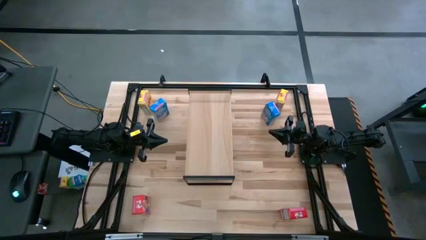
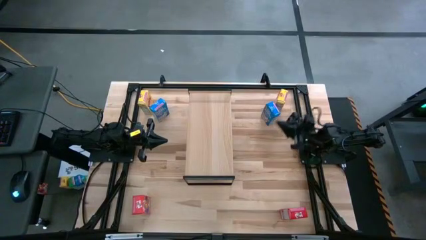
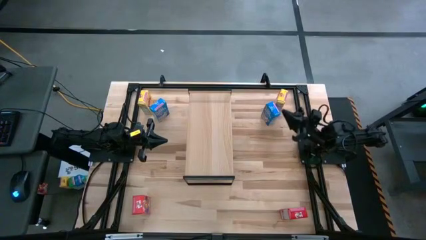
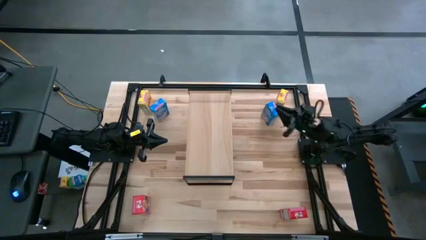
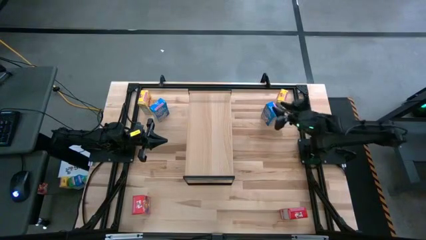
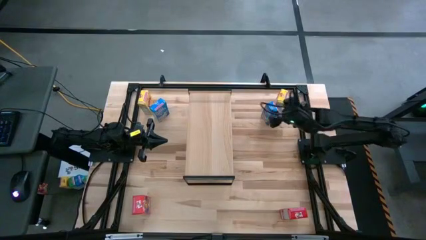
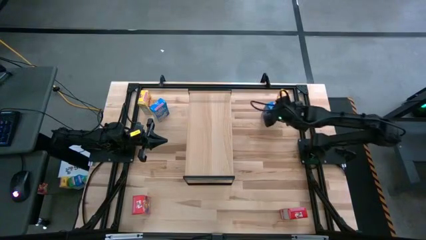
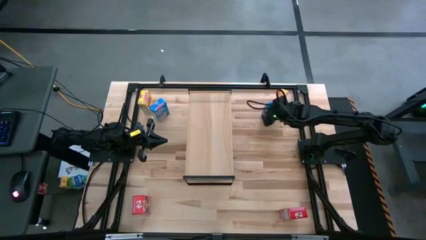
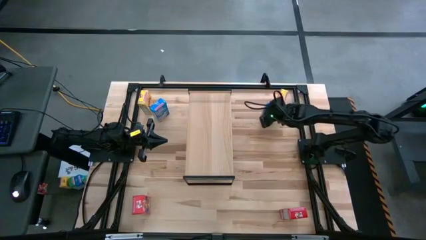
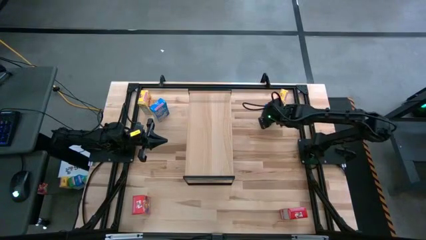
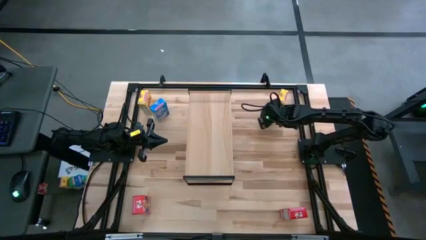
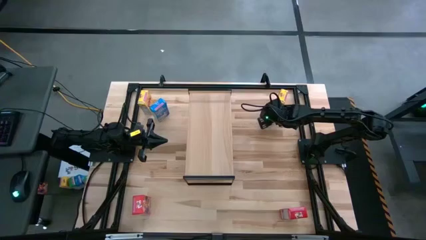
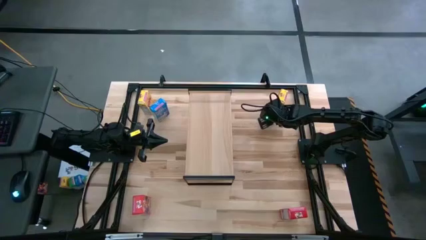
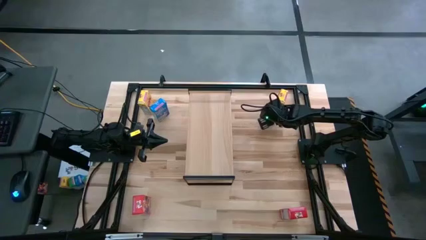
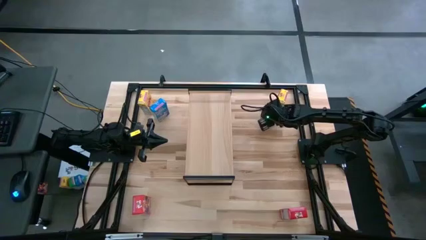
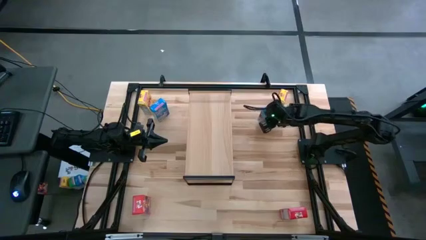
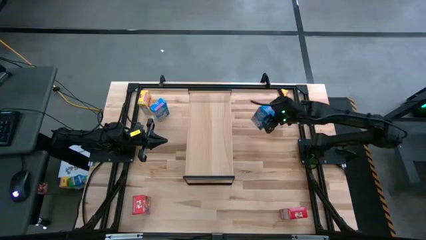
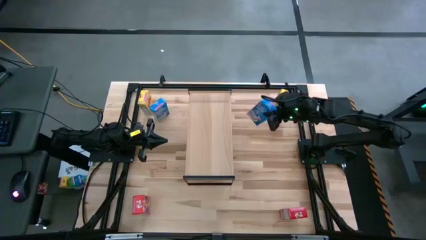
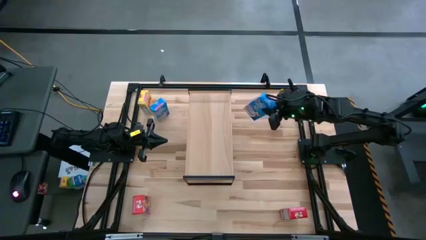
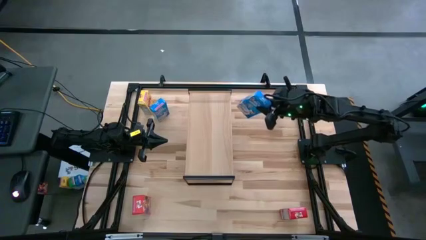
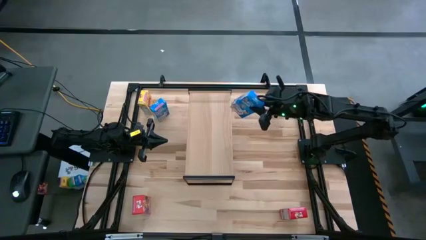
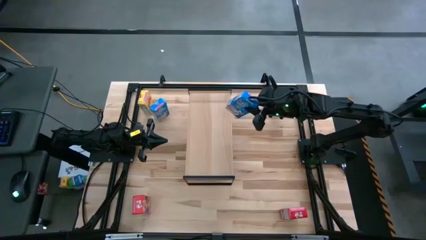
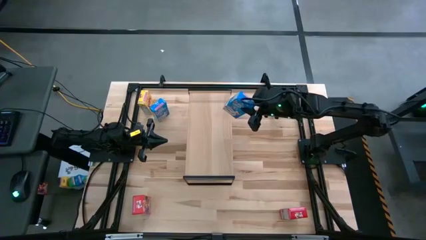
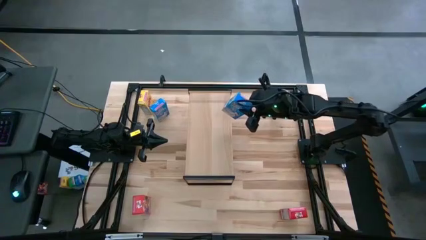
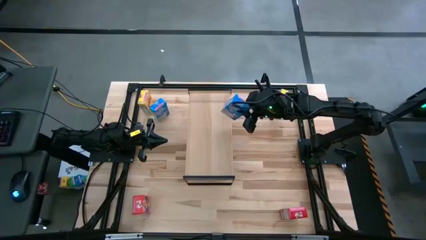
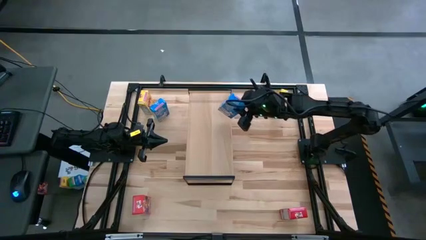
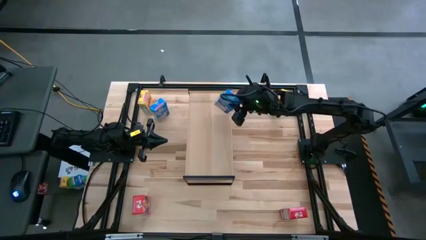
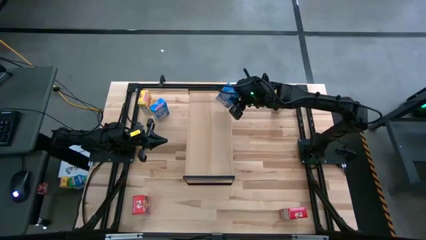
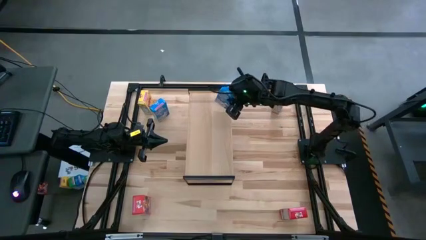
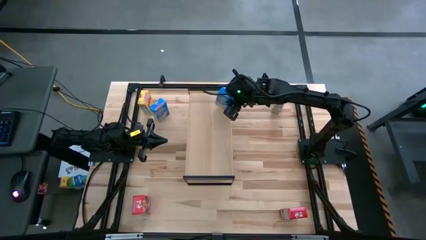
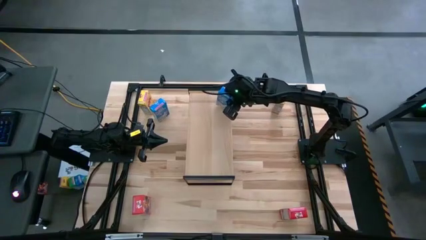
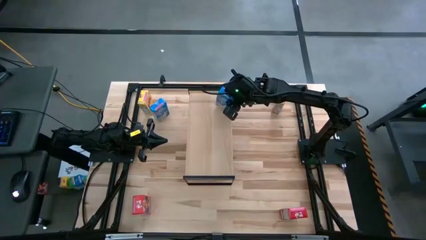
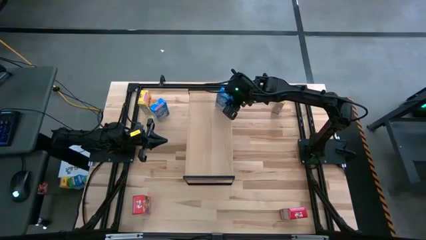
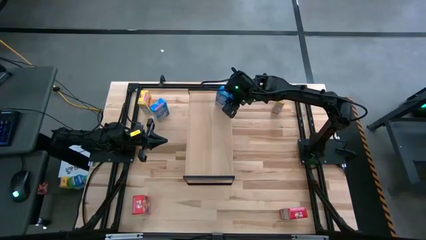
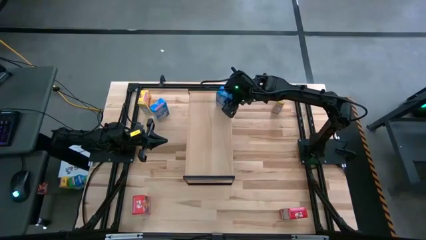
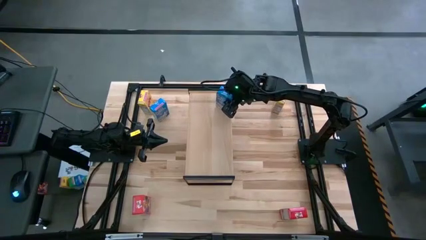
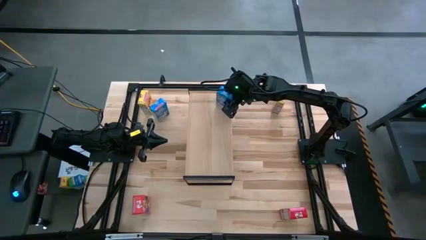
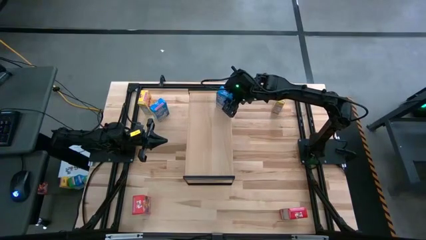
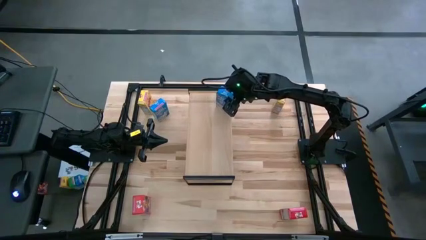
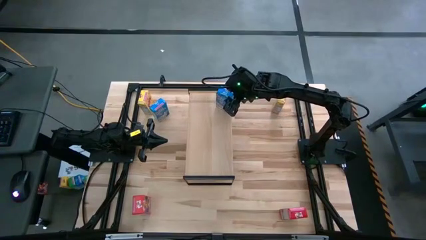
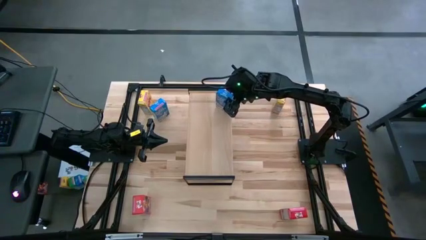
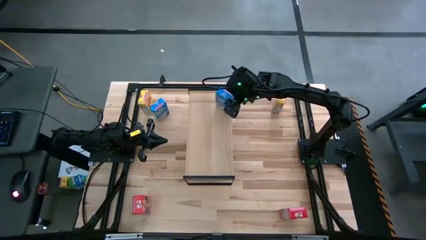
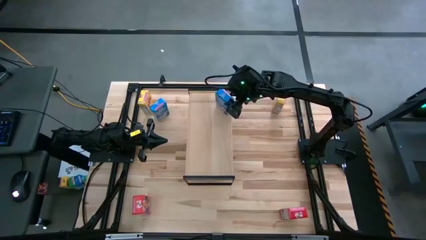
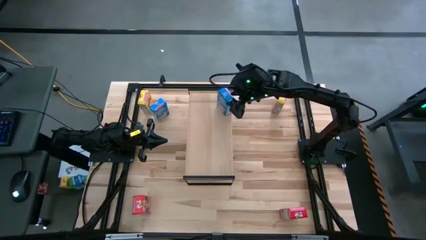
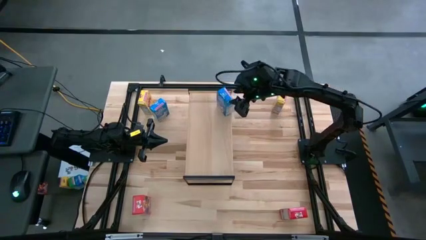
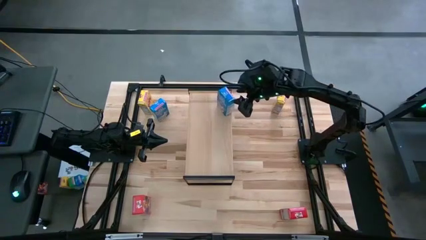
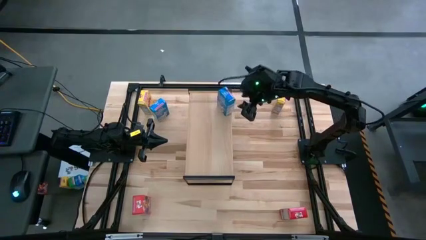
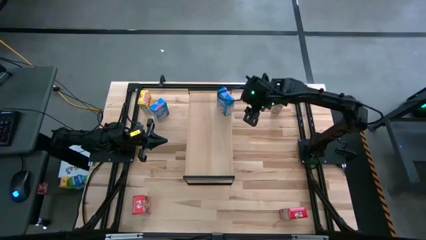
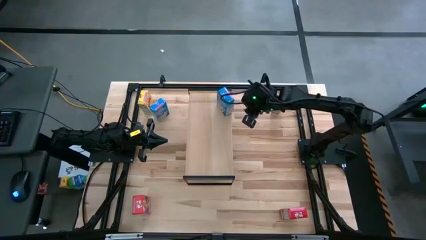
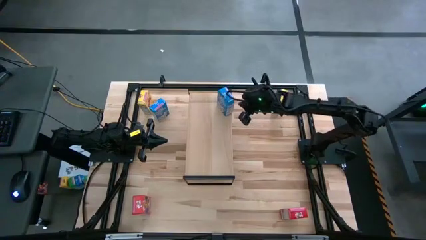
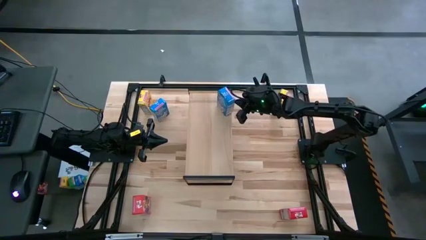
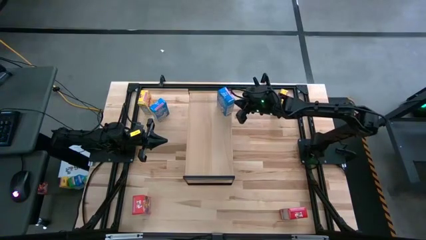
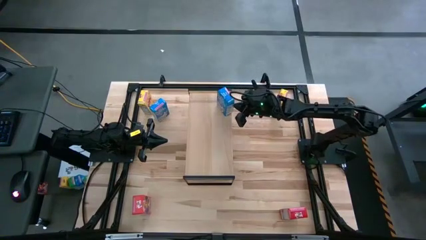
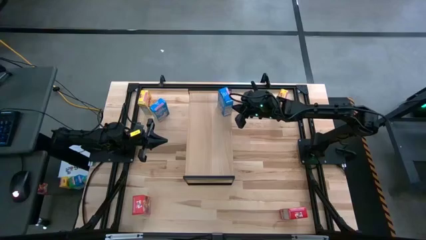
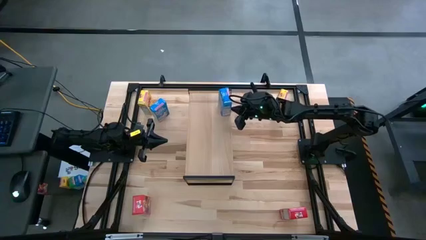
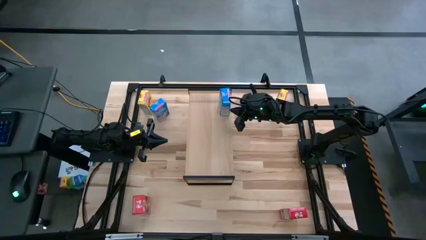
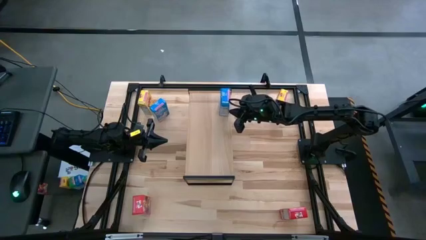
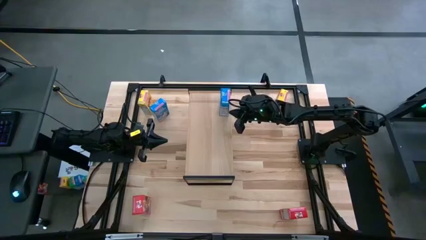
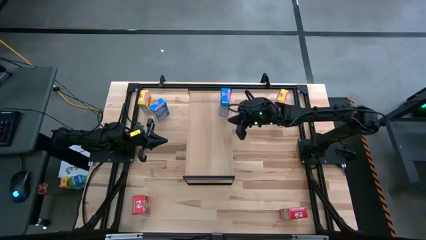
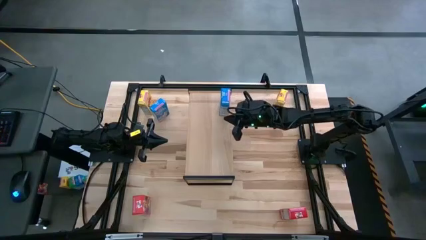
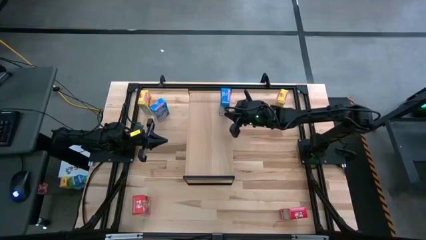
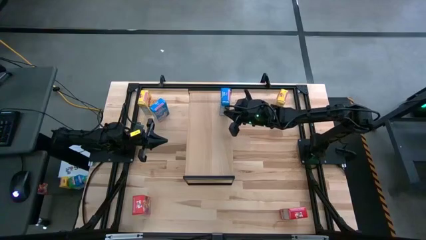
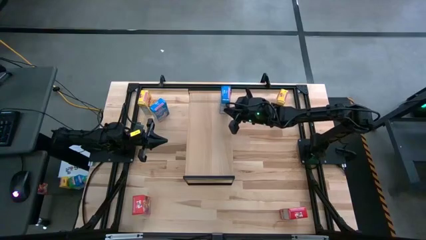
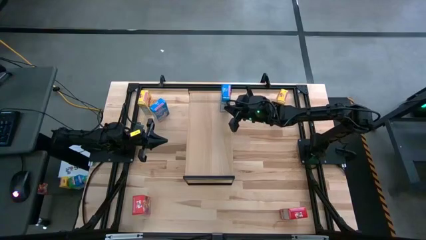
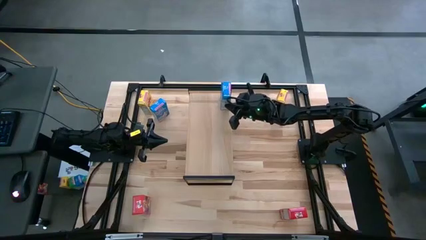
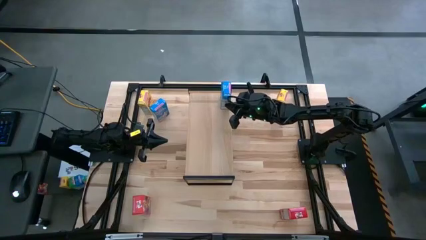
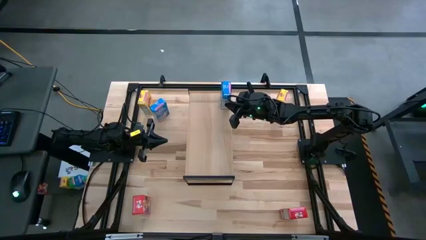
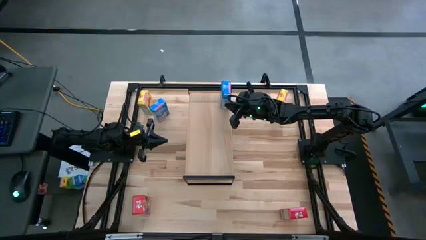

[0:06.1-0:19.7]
Task: Stack cereal on shelf
Put the right blue cereal box on the shelf

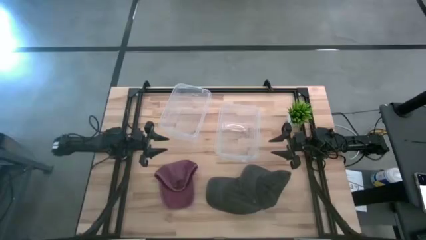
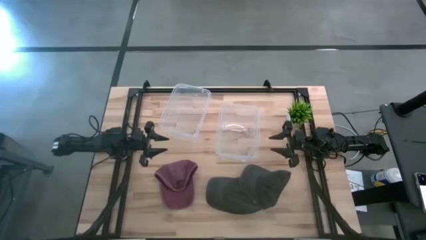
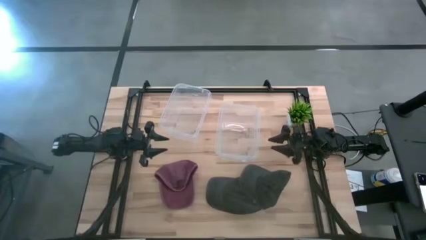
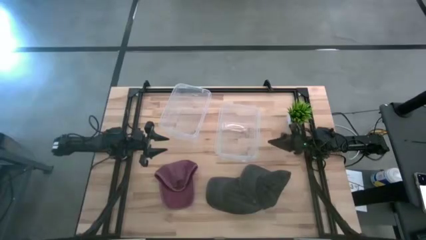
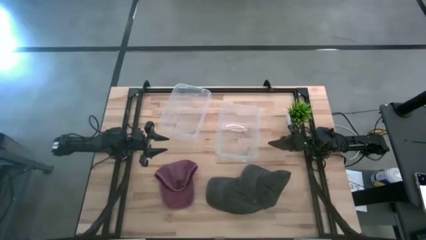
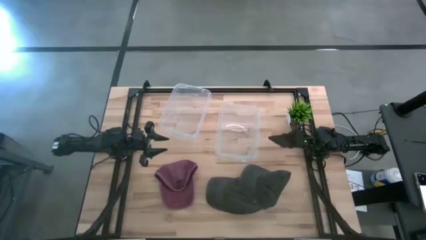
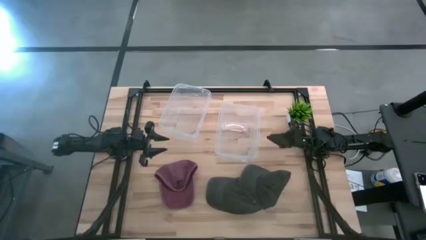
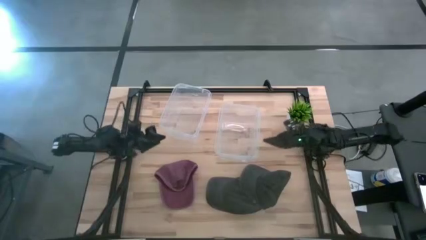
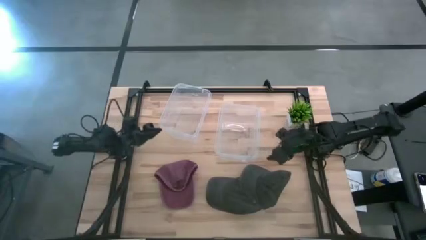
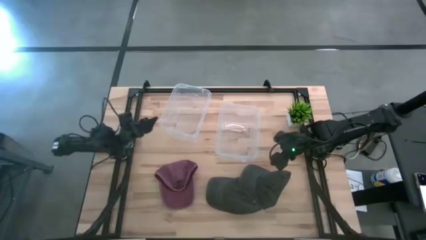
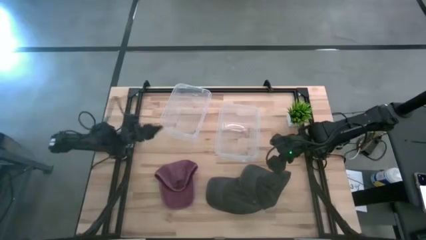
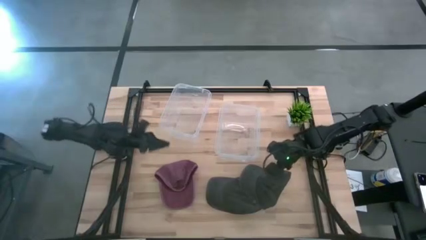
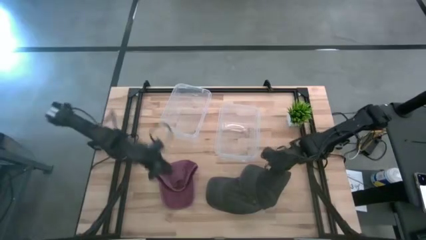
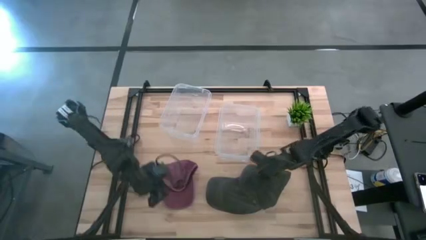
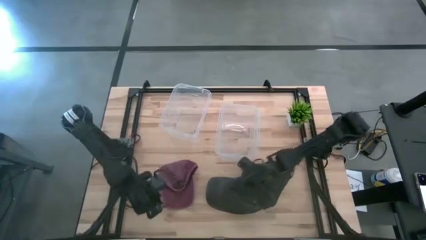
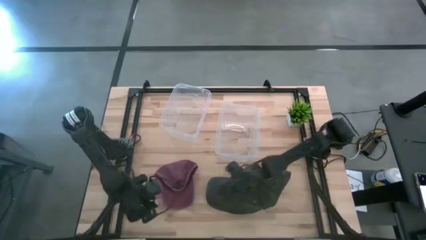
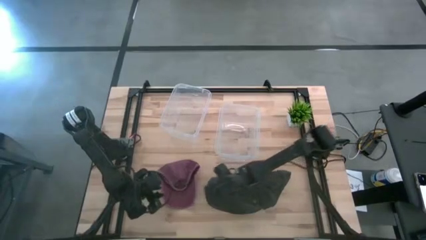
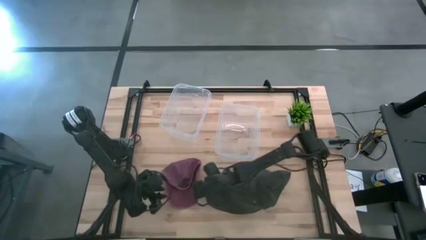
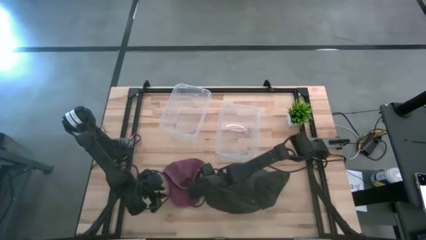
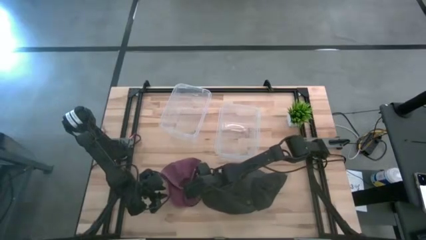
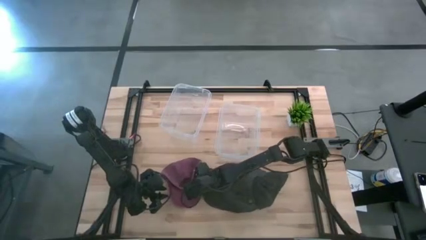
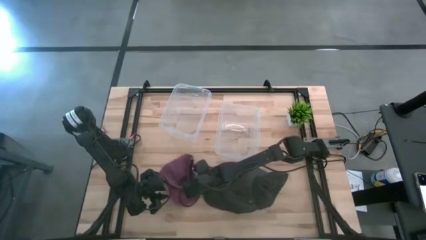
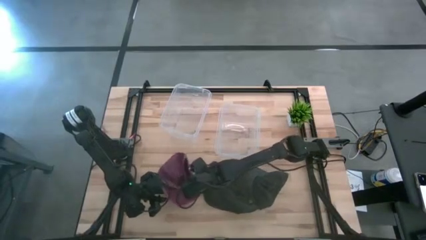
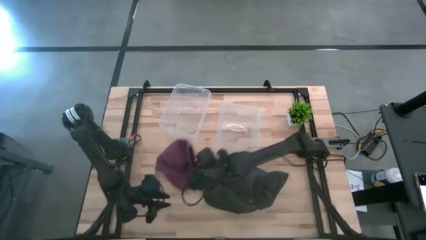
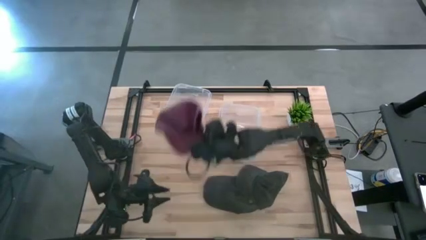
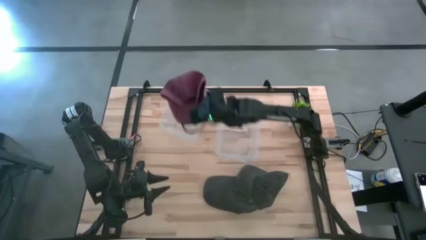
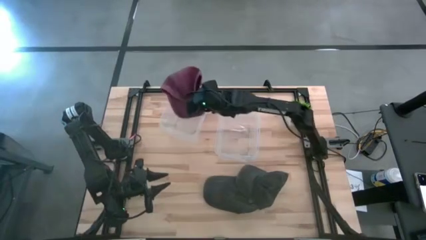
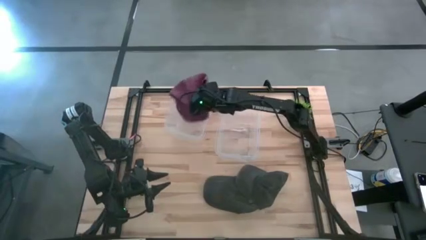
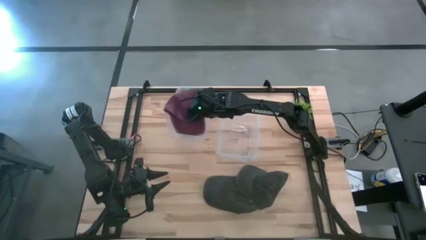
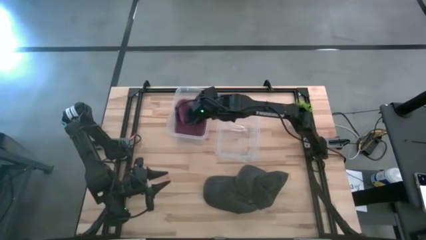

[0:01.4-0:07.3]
Task: Pick & Place hat
Put the red cap into the left transparent bin
